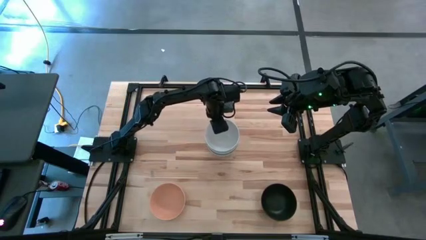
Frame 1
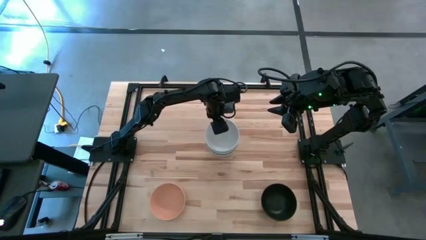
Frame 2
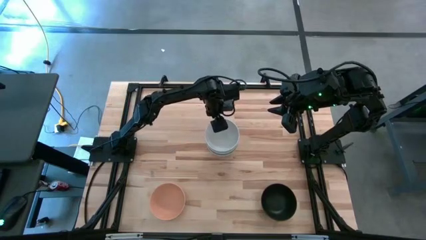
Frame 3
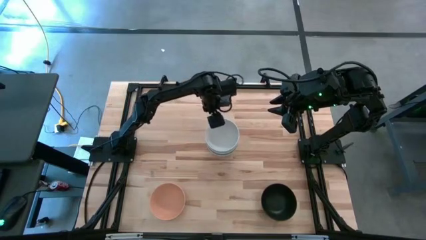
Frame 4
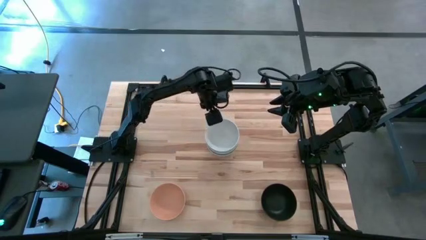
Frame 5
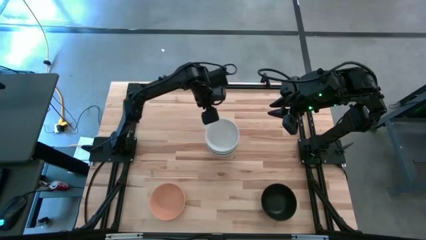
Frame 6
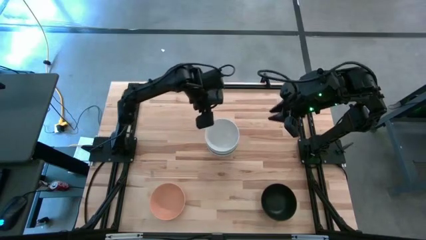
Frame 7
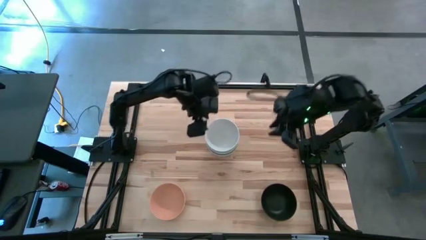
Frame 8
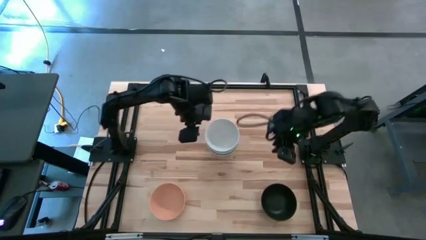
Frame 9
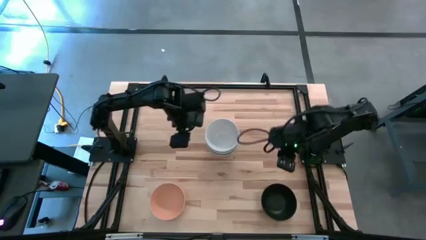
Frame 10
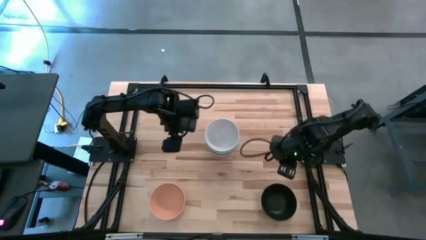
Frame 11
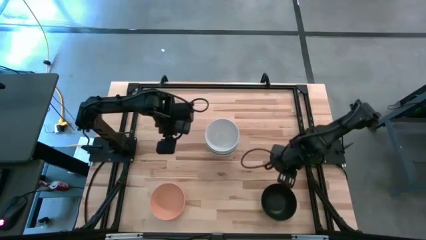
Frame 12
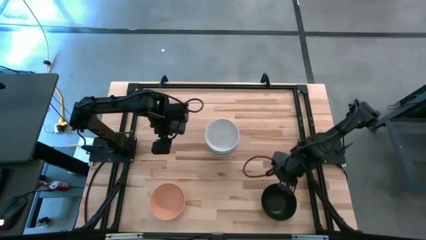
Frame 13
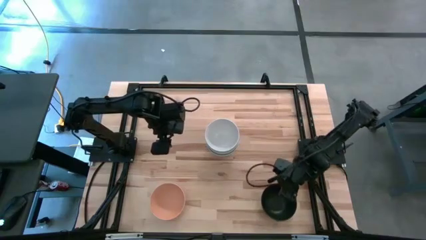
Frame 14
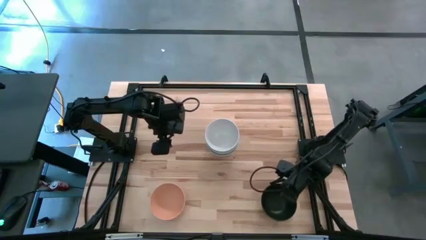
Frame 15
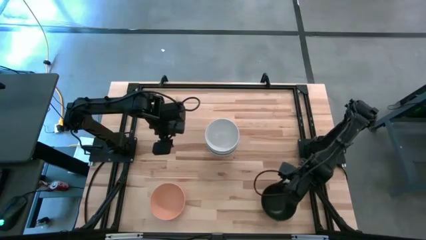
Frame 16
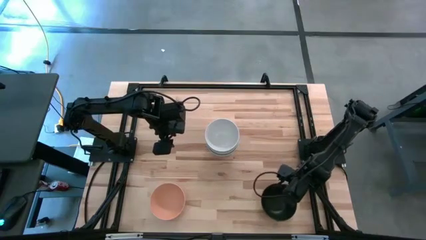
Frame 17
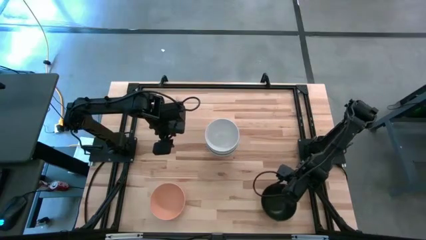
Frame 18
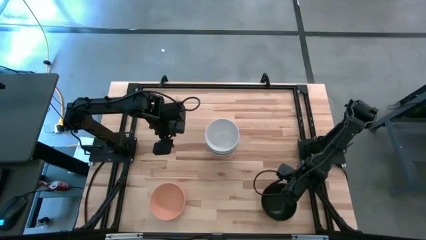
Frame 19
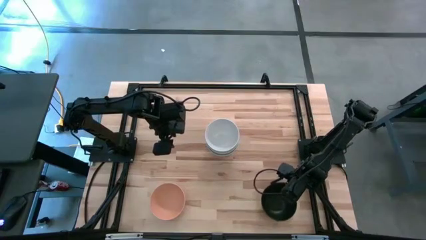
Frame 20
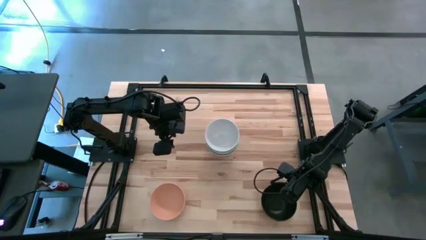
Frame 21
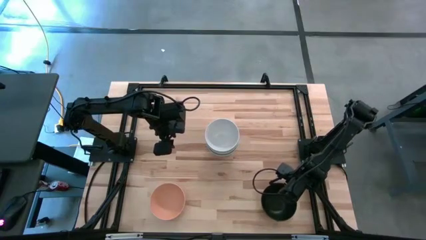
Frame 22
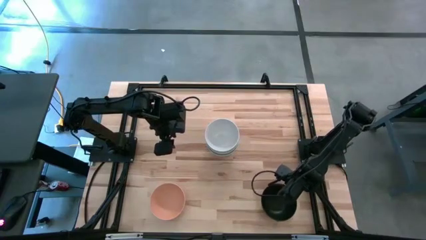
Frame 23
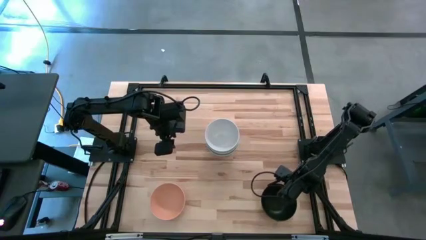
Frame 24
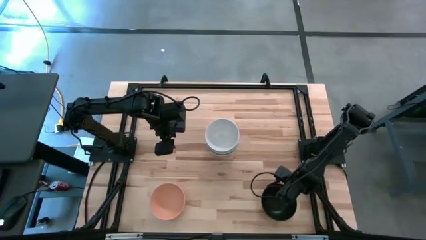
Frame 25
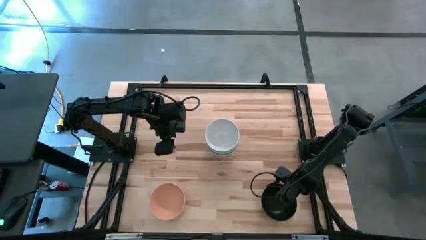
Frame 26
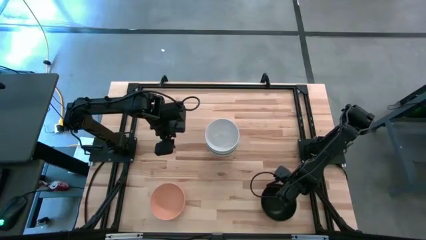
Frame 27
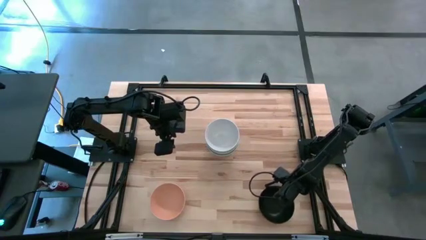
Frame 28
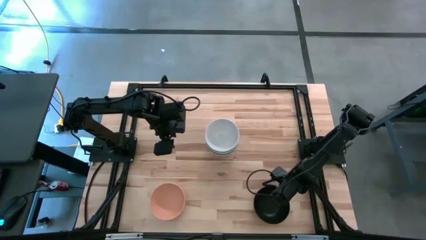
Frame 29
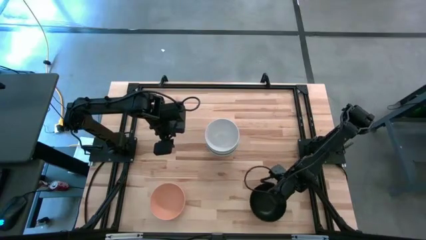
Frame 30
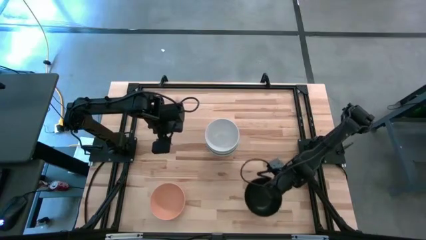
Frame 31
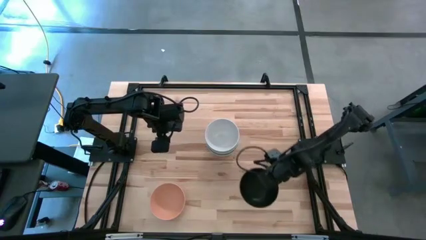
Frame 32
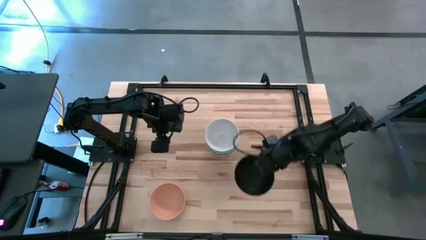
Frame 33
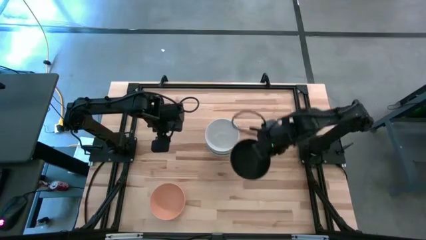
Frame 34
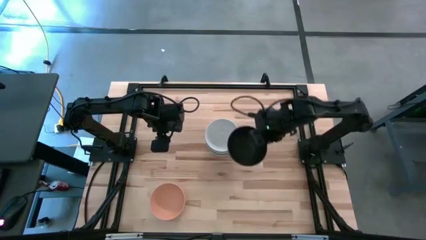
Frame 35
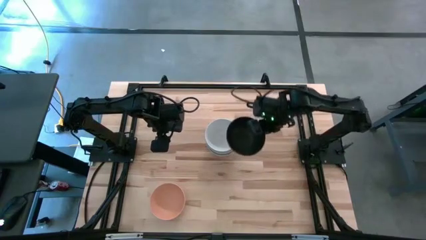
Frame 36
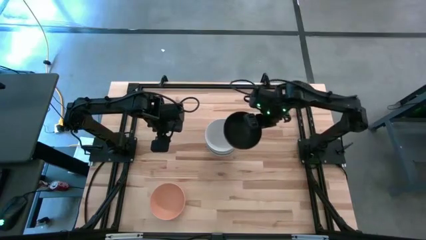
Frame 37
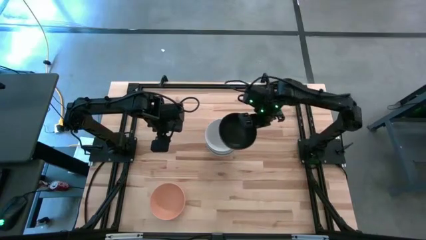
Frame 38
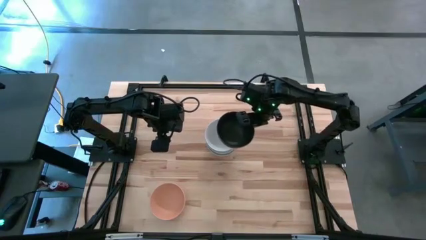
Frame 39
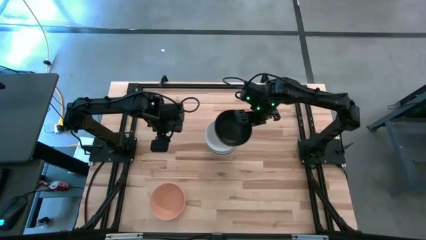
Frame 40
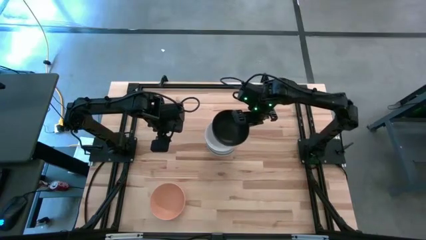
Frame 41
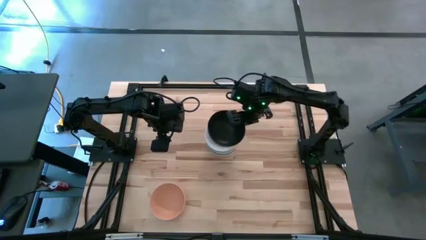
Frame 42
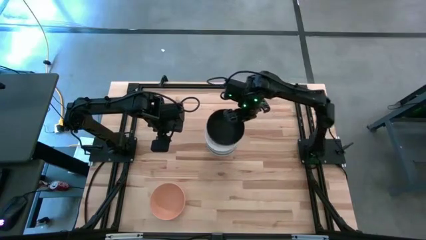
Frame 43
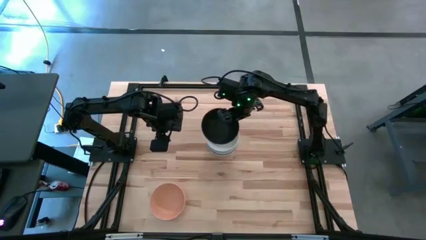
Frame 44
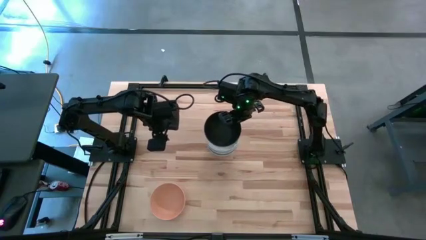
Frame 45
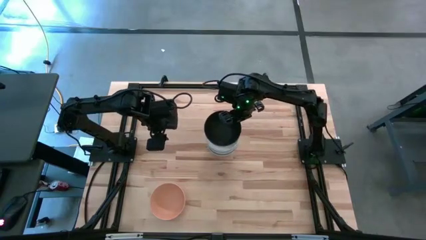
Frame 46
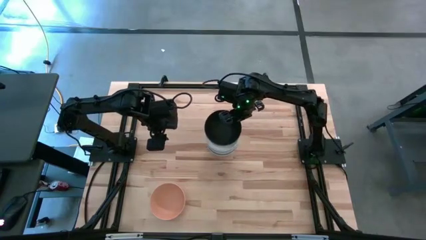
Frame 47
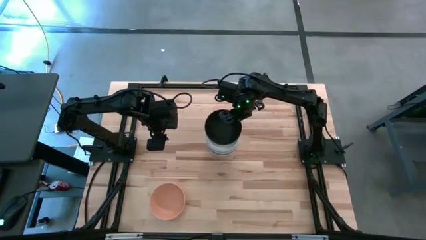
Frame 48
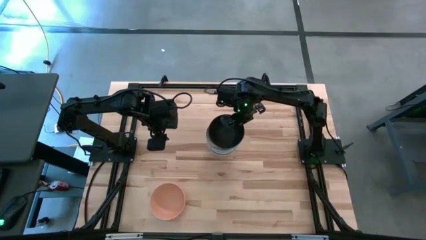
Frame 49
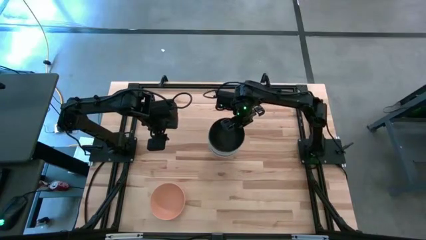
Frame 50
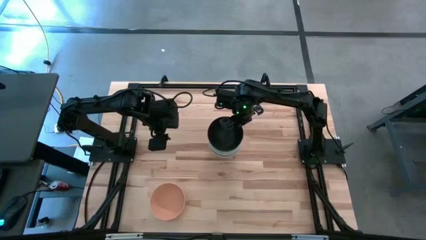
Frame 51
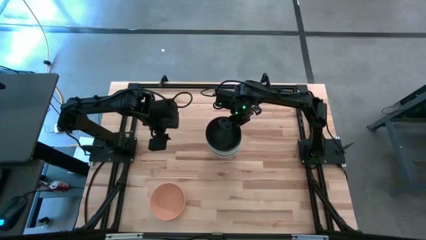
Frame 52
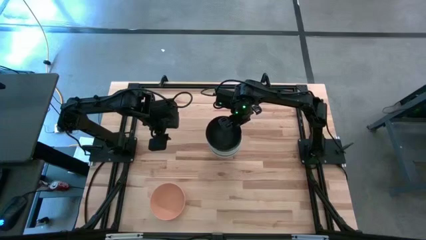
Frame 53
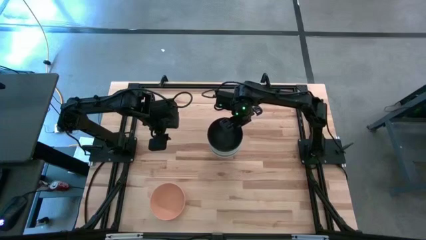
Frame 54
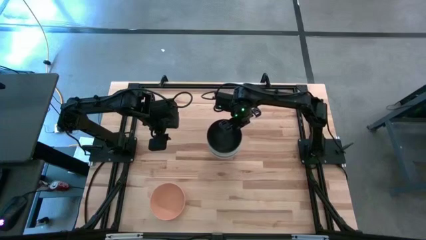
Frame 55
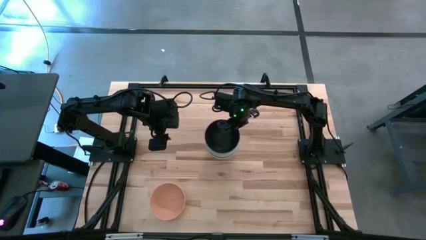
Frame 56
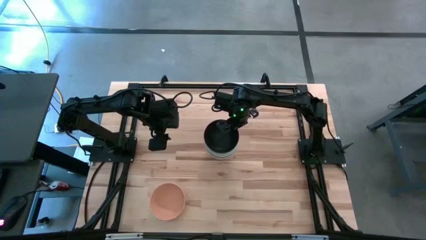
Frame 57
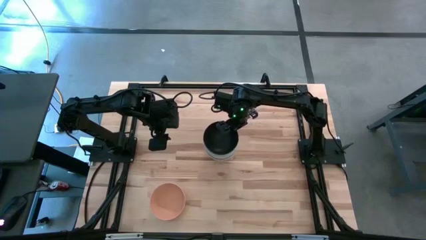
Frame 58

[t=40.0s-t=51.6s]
Task: Nest bowls inside each other
Stack the black bowl on the white bowl

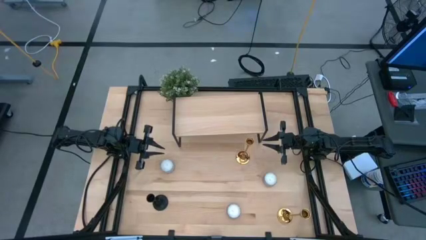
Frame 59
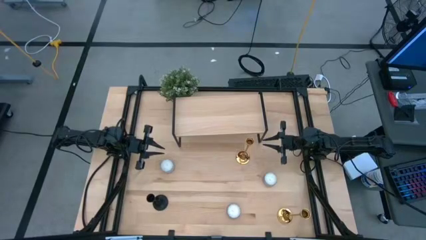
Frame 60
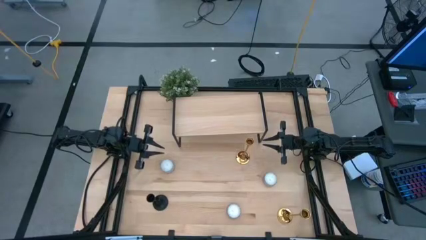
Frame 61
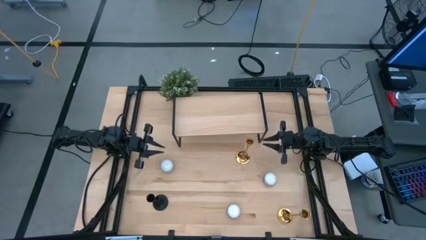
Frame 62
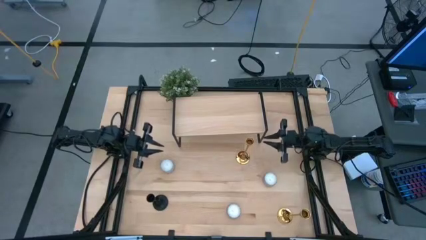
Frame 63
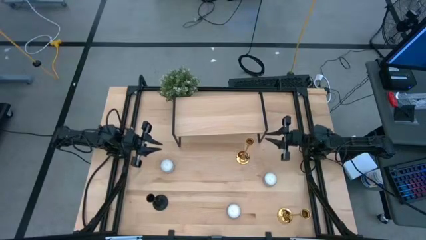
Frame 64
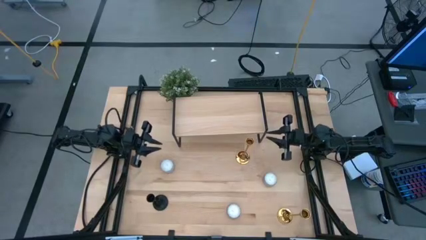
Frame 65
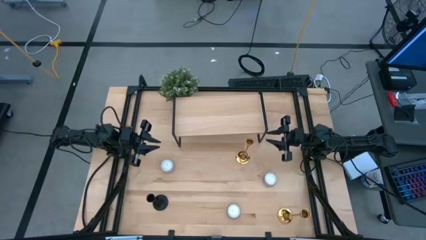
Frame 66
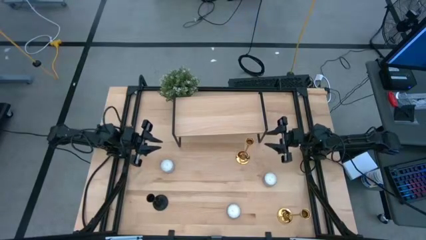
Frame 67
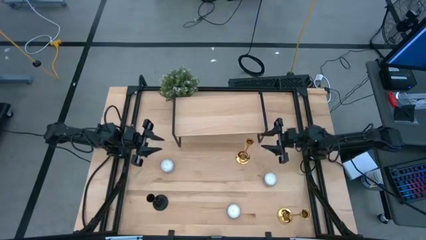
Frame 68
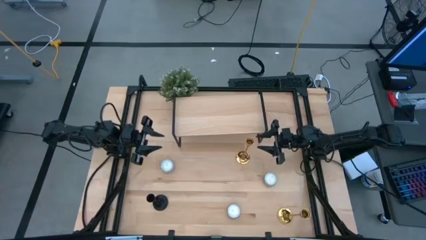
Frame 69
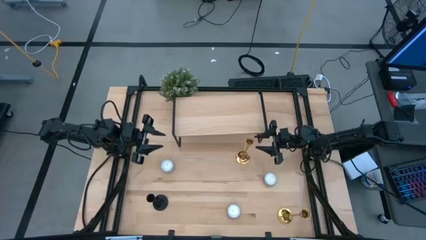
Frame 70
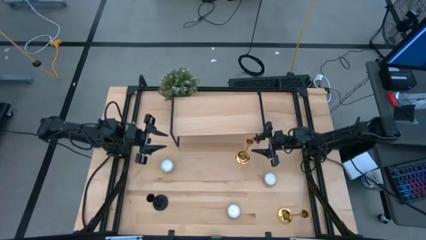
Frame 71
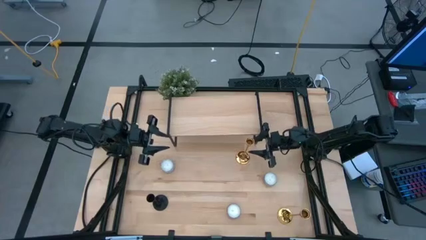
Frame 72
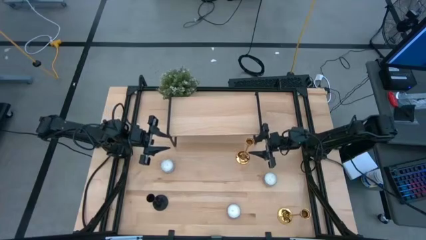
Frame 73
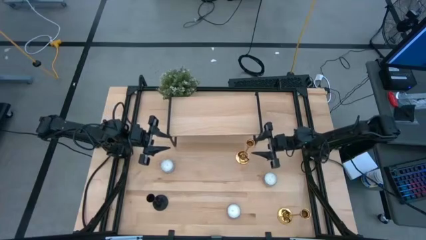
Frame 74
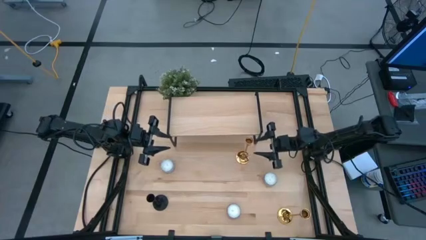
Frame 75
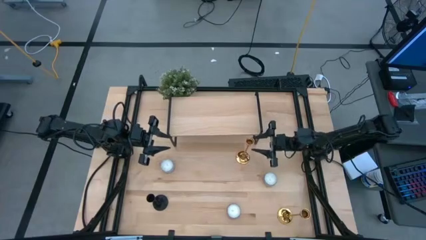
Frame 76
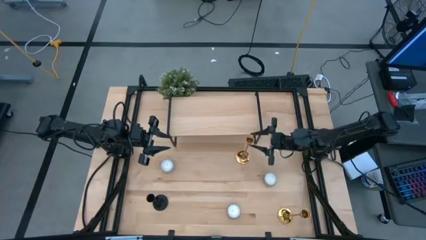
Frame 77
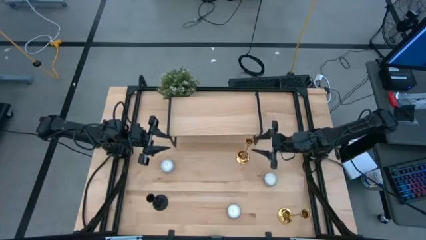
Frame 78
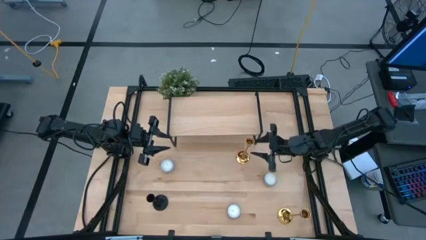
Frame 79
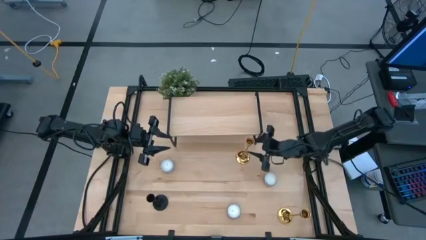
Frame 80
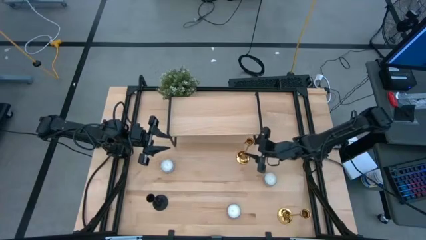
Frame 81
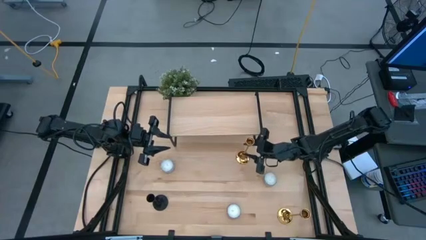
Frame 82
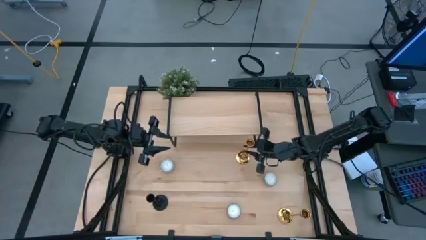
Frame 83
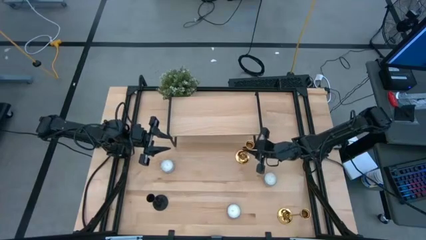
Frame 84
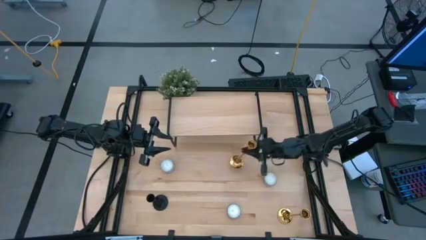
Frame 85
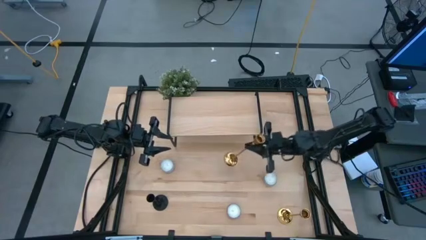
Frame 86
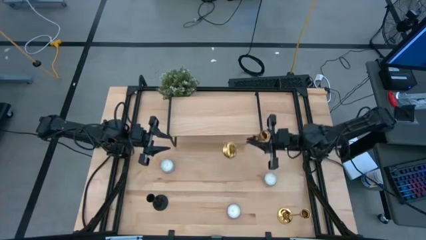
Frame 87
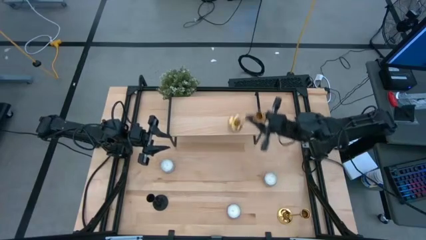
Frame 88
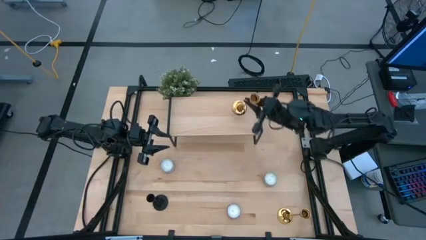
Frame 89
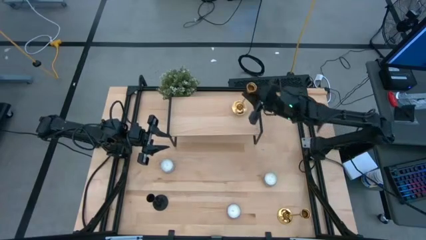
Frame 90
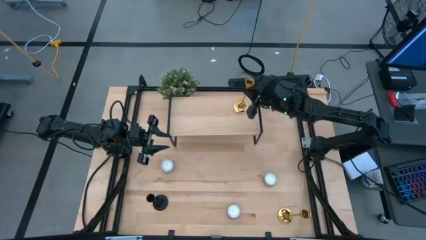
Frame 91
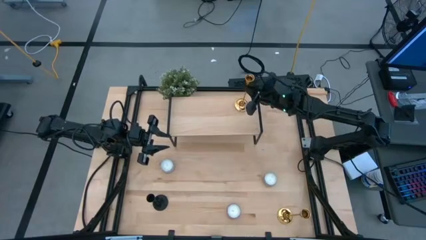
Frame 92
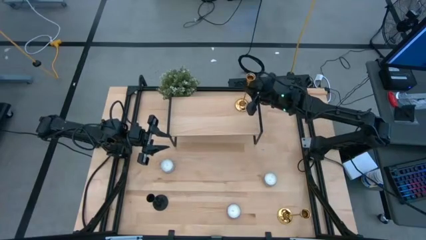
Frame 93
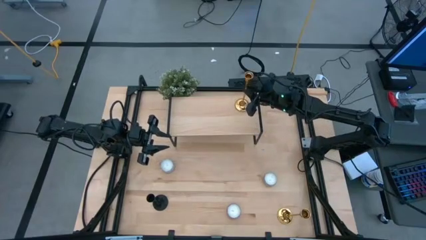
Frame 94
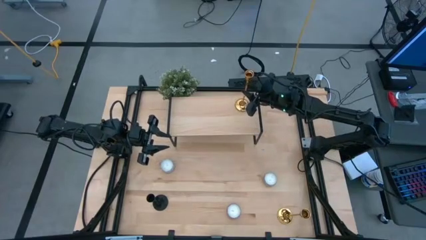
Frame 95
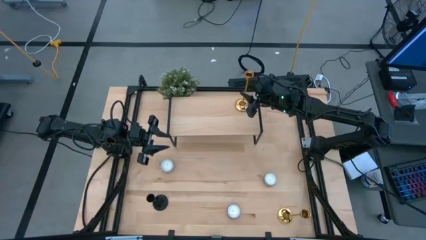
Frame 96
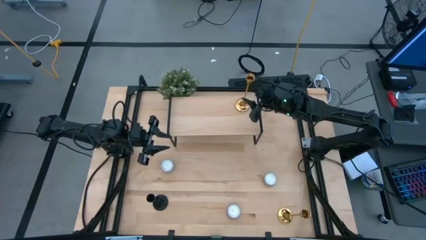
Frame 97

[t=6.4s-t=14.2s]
Task: Pick & Place candle stick holders
Put the top gold candle holder on the shelf
